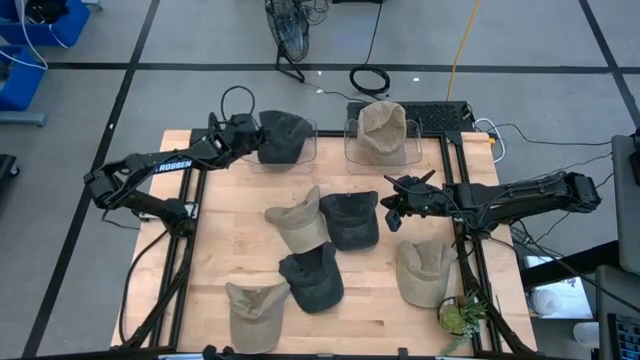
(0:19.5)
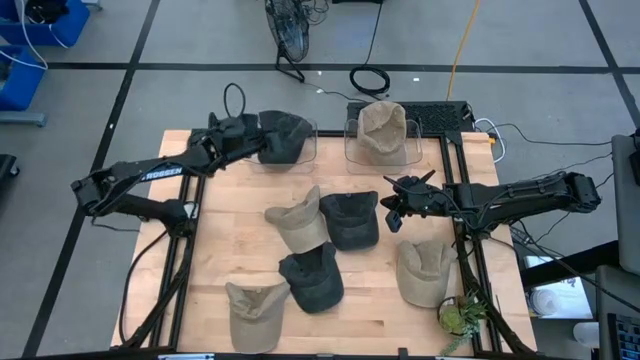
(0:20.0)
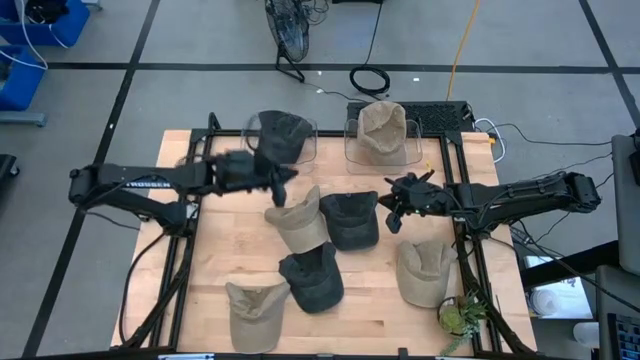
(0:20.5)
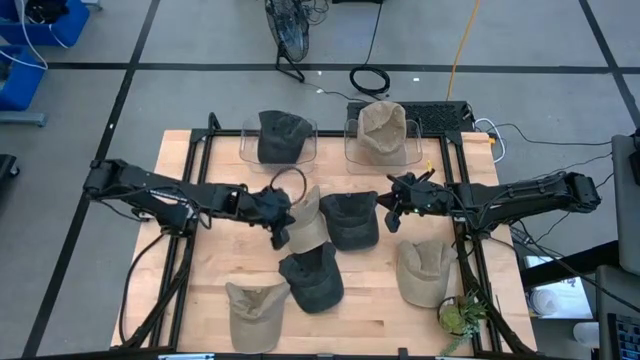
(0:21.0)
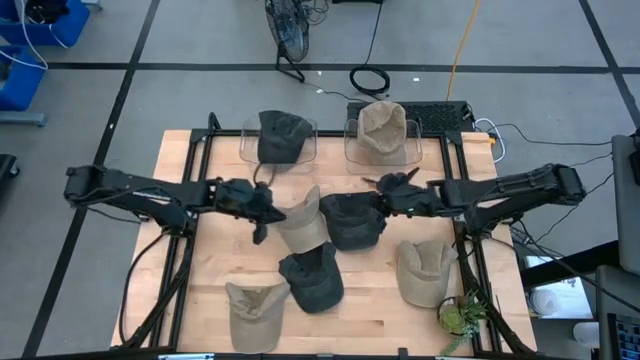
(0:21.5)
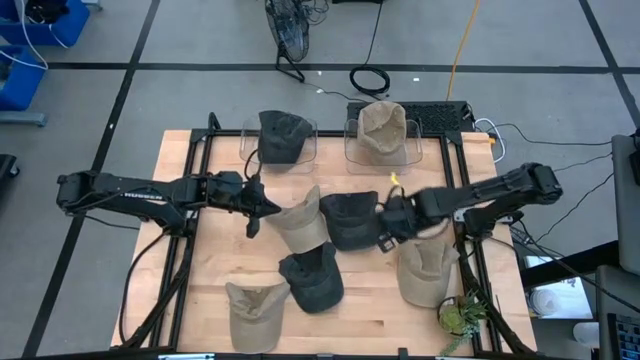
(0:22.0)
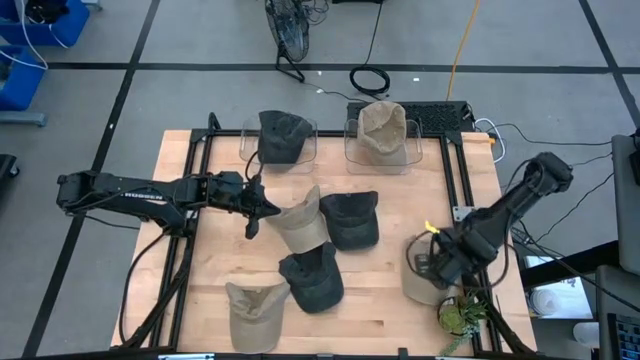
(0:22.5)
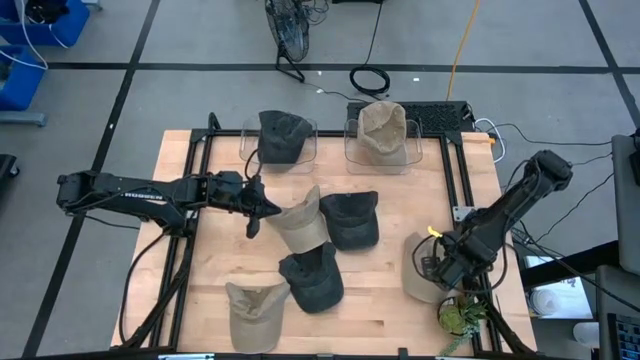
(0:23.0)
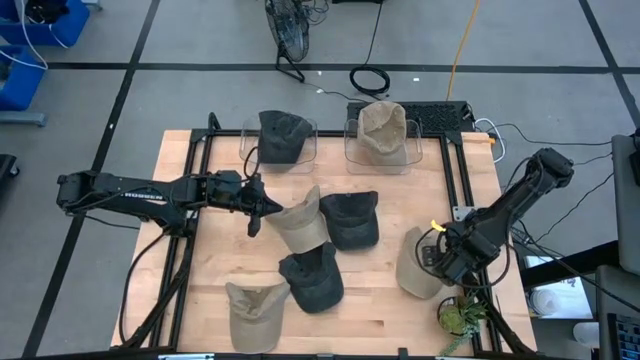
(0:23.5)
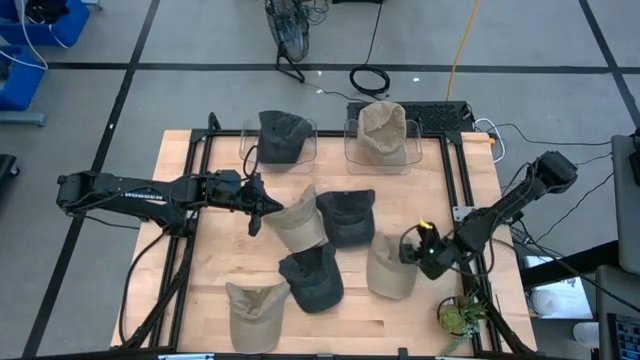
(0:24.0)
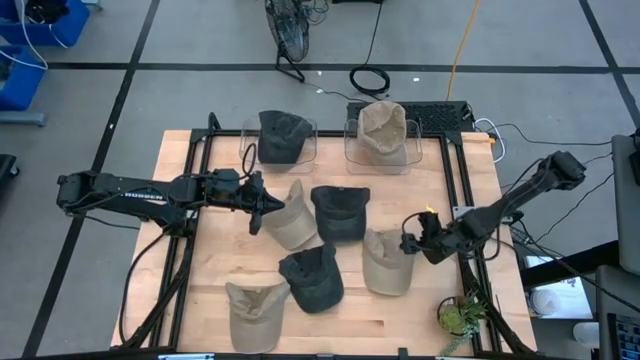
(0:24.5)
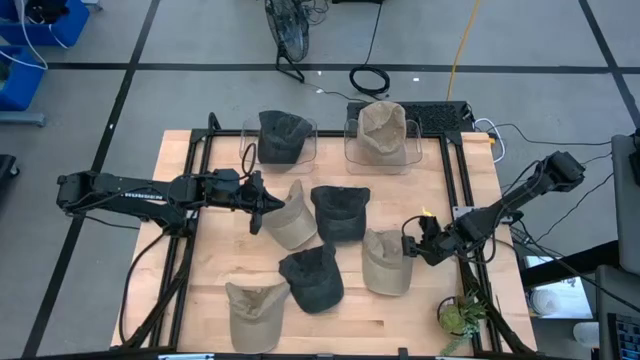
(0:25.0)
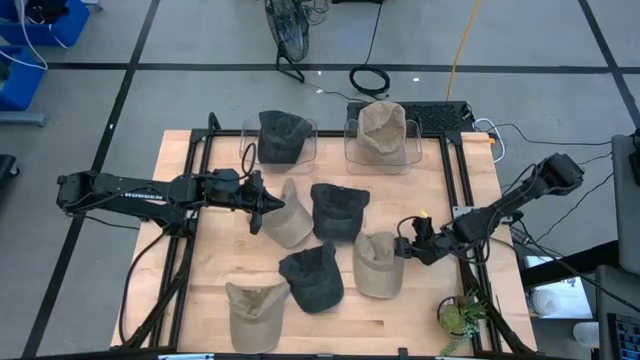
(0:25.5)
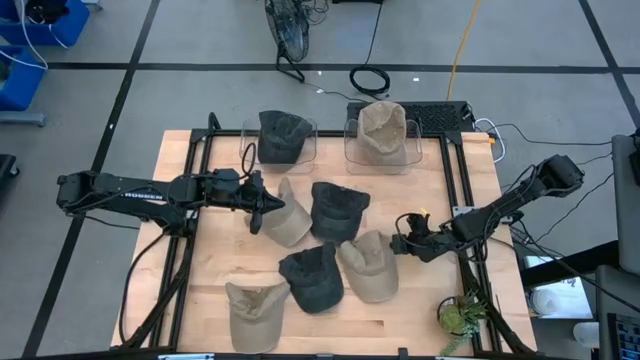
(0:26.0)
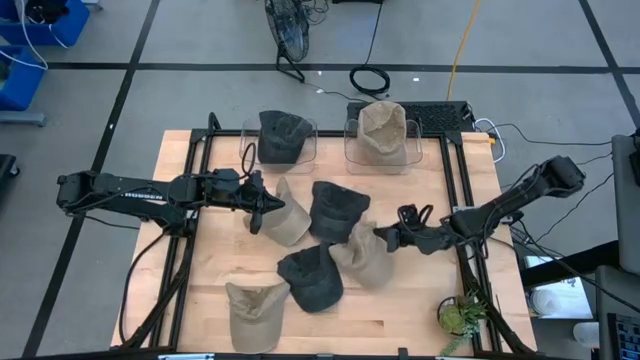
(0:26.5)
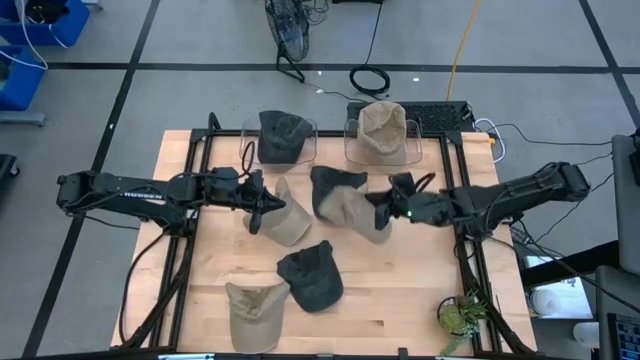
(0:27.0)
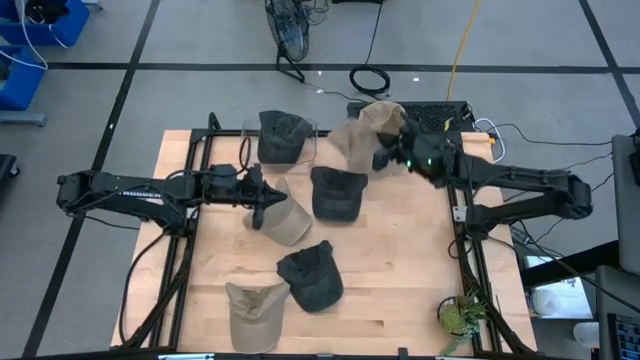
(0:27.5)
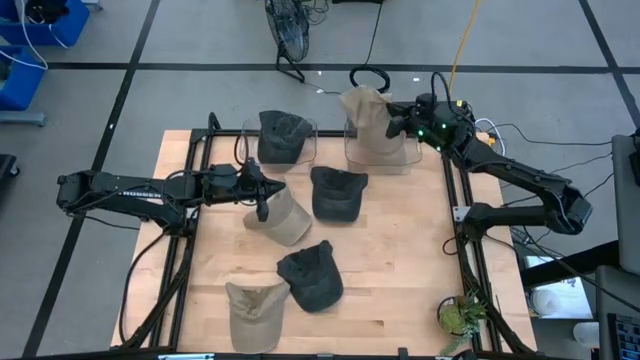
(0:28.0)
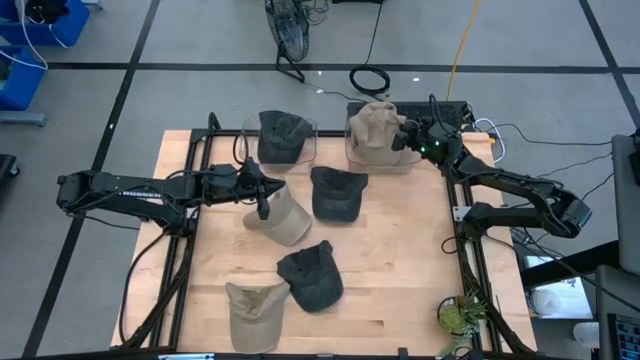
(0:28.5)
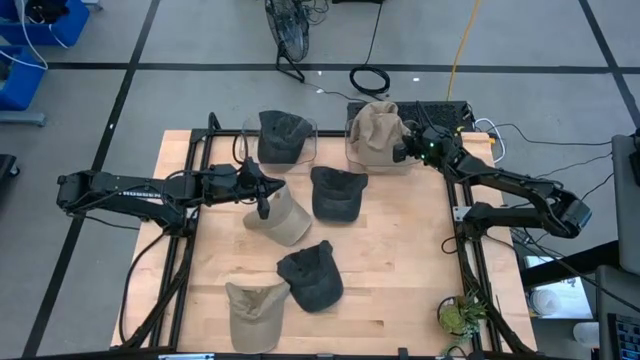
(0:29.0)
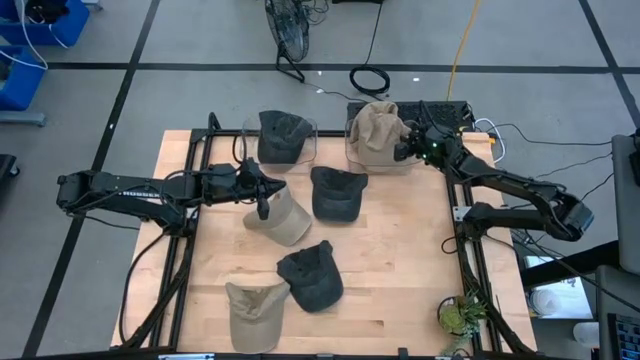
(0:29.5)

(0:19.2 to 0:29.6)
Task: Pick & Place hat
Put the brown cap into the right transparent bin

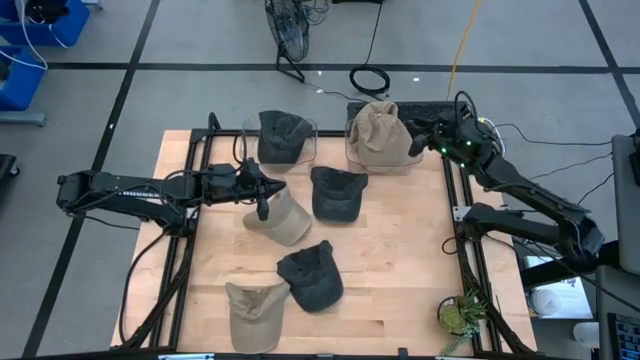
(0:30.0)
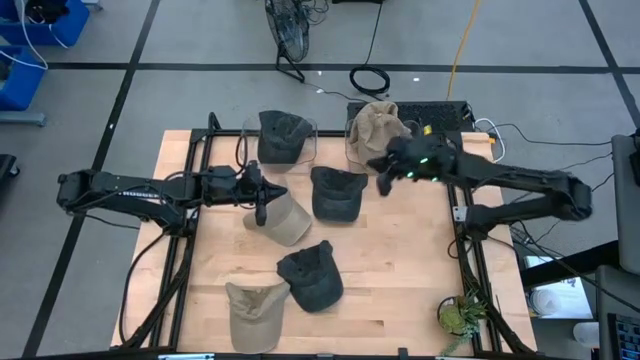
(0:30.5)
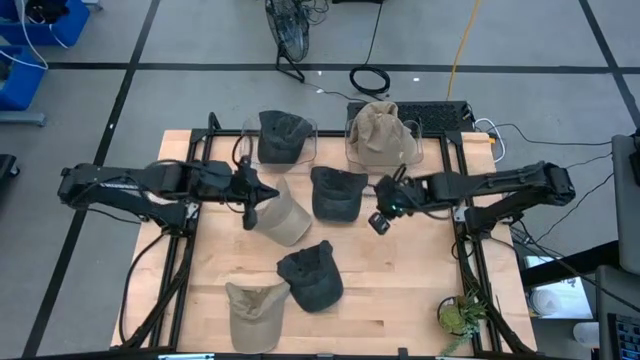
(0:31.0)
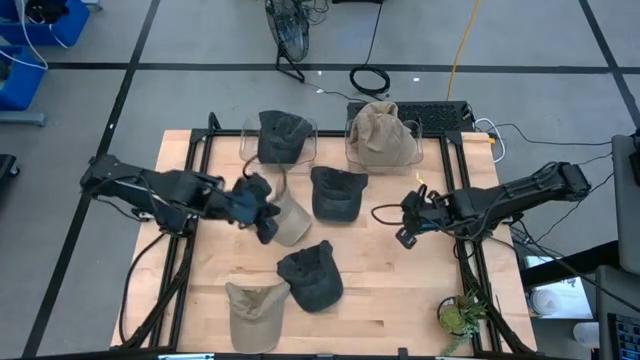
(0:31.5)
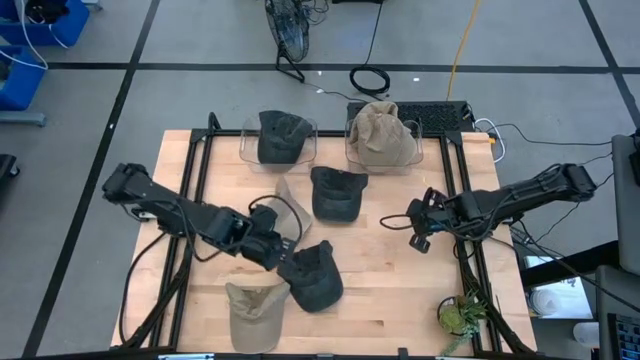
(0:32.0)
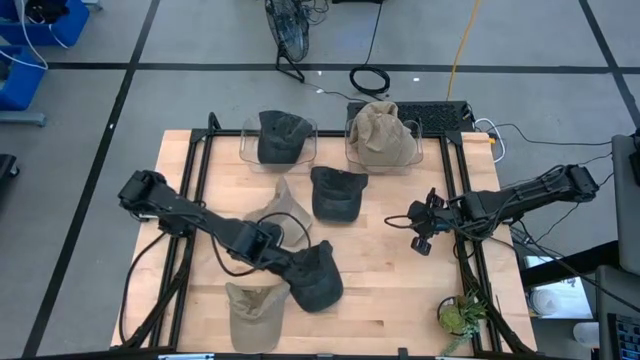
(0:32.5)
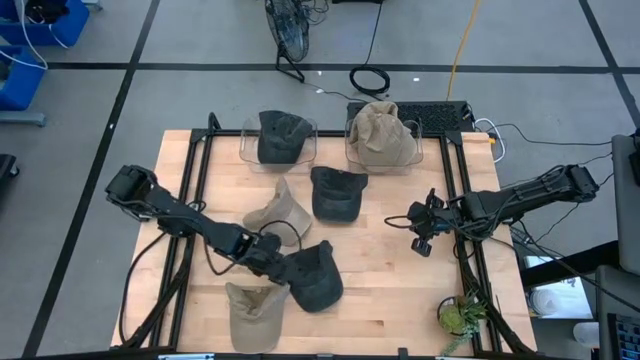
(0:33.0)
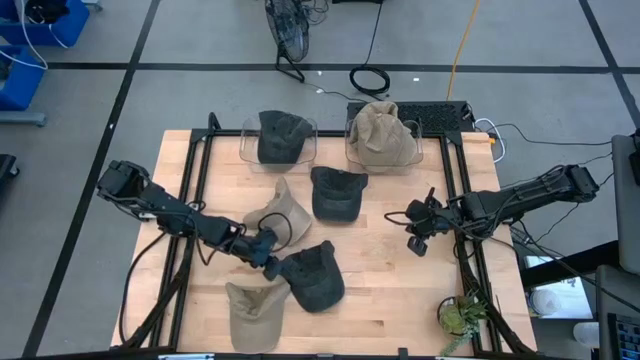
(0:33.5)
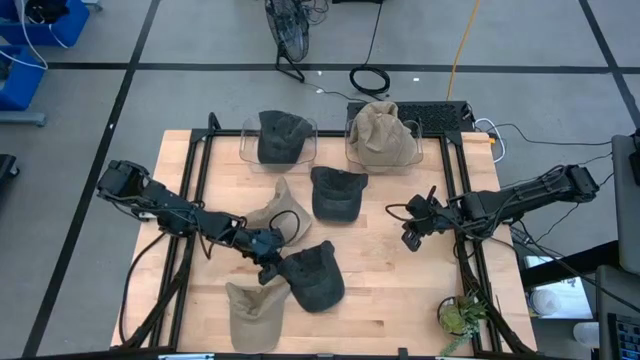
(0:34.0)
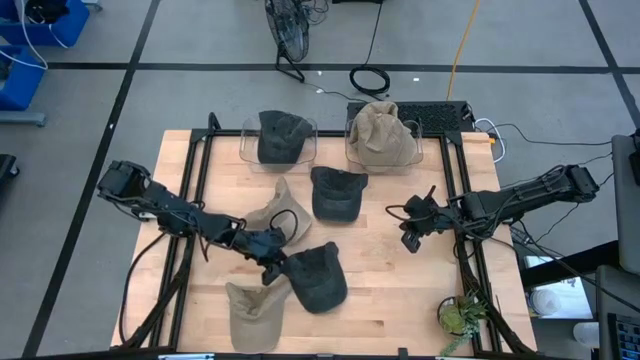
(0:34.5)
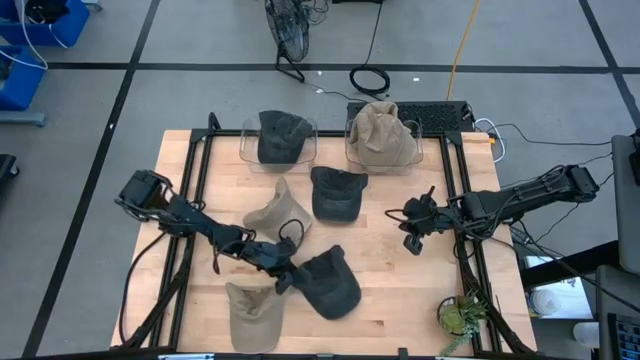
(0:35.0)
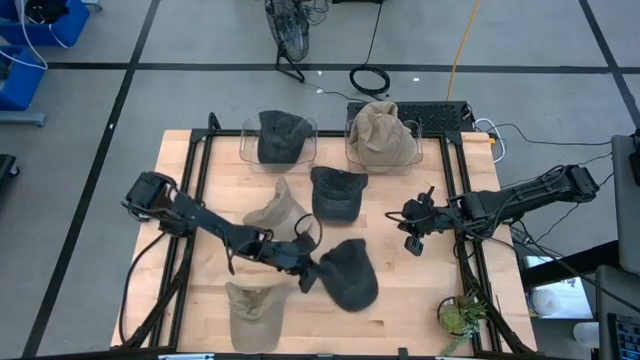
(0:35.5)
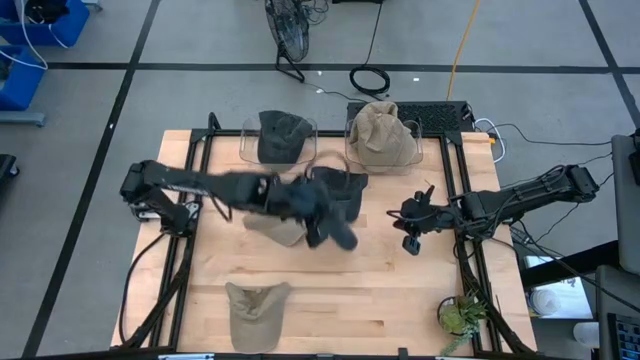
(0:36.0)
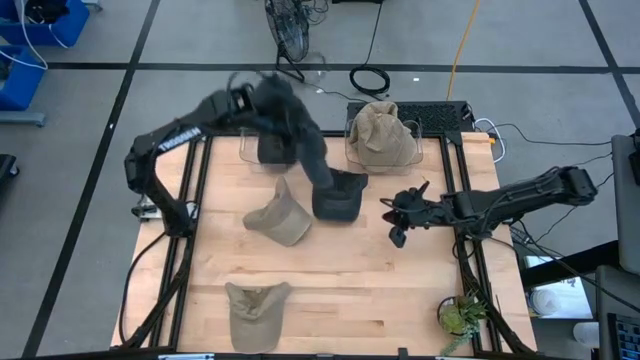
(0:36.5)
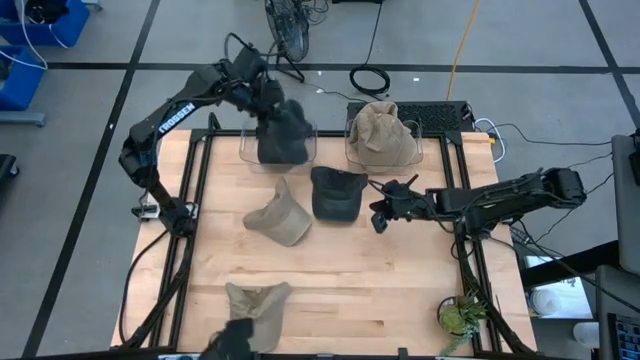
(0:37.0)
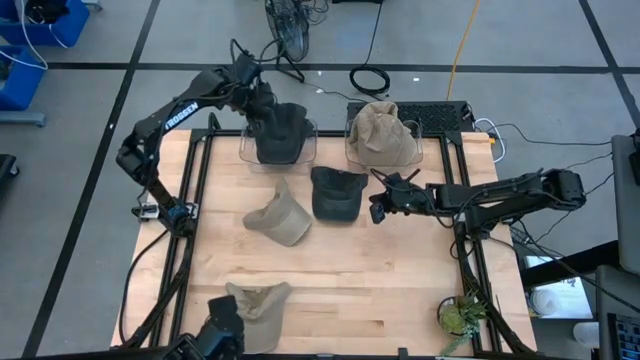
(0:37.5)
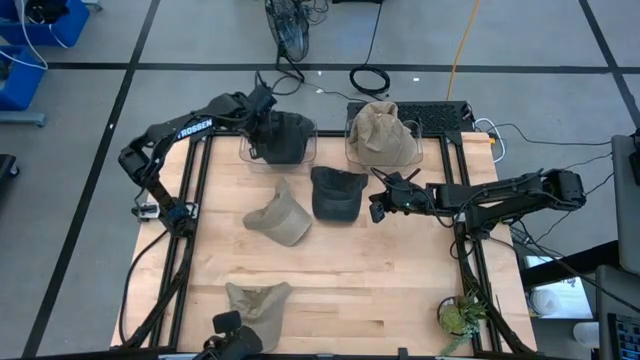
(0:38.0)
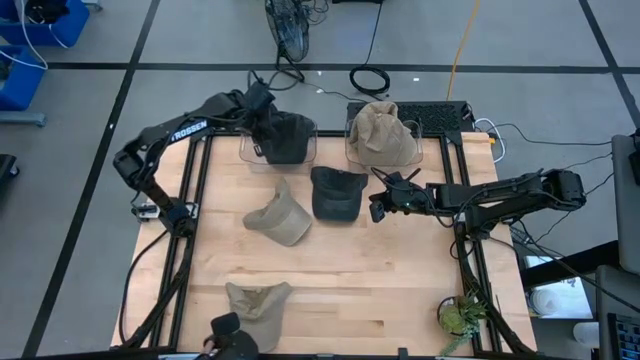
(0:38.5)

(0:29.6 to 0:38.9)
Put the black cap into the left transparent bin

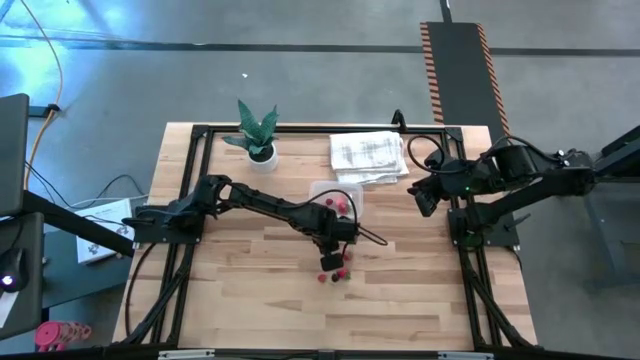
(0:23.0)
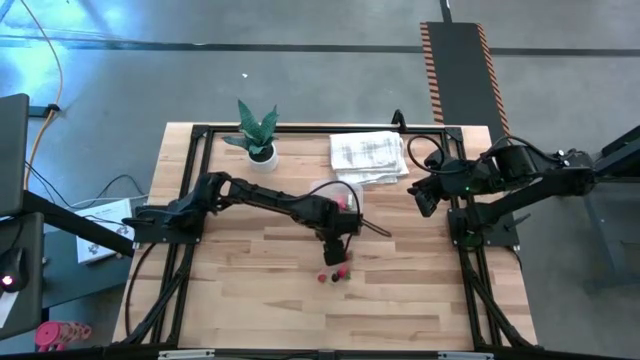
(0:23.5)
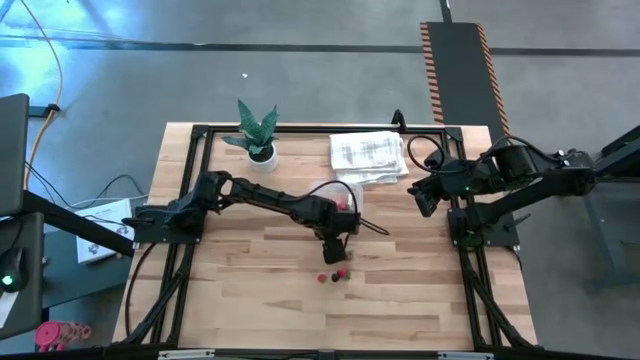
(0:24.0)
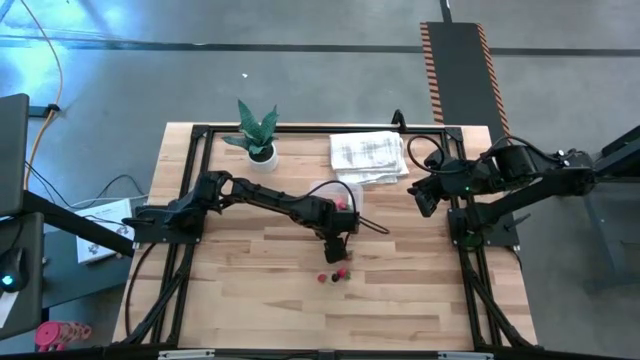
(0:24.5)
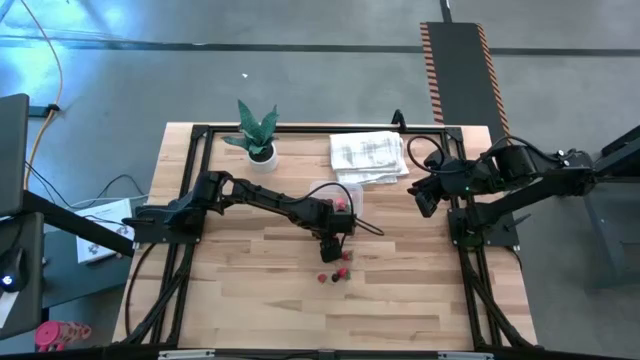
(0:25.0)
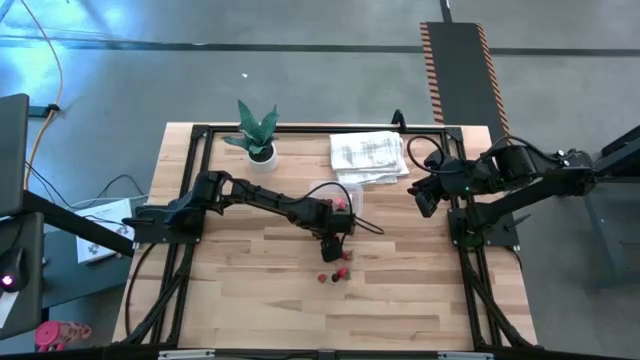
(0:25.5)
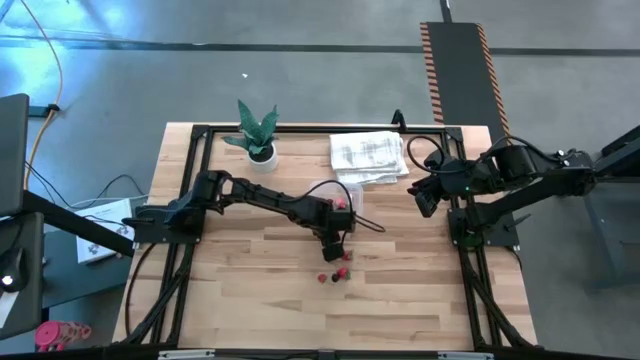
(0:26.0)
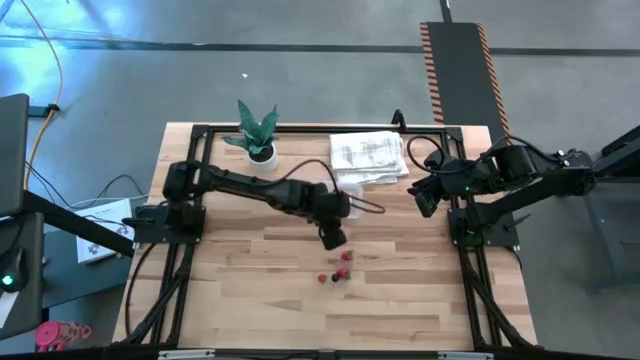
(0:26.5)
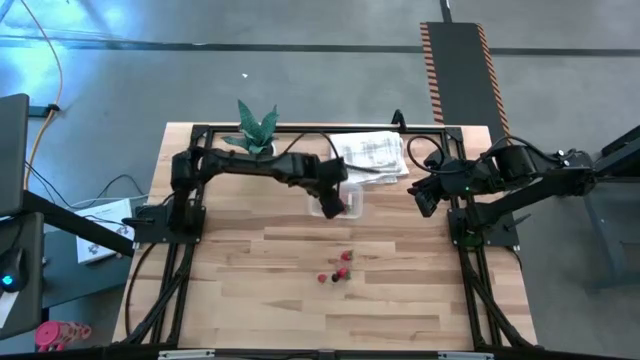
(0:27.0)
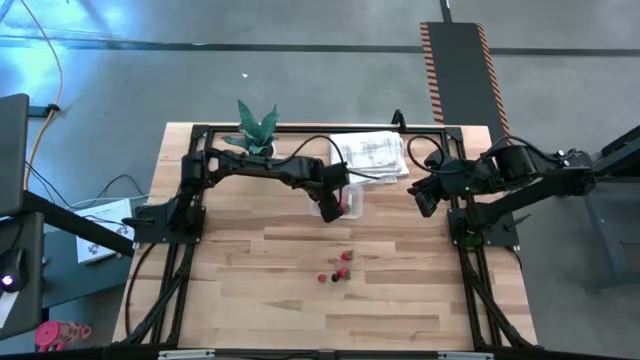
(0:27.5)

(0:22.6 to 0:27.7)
Task: Pick and placing Produce into tupperware
Put the raspberry into the transparent bin
